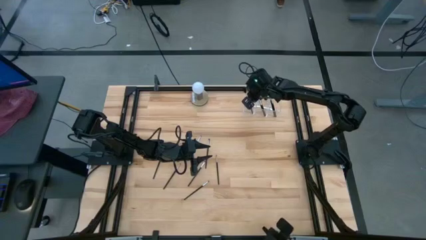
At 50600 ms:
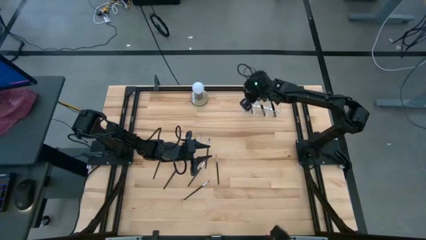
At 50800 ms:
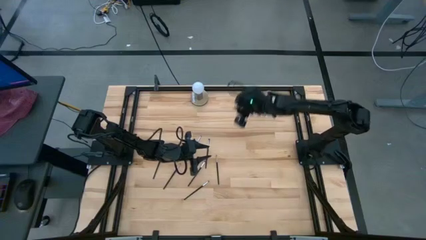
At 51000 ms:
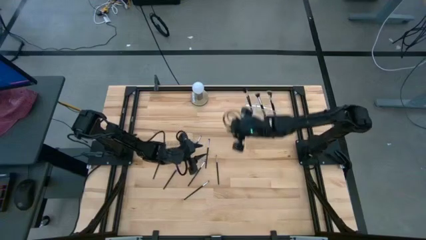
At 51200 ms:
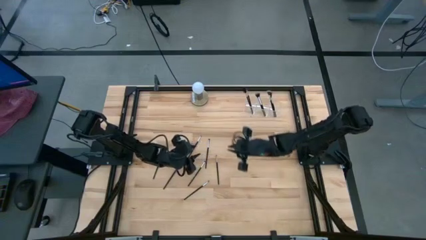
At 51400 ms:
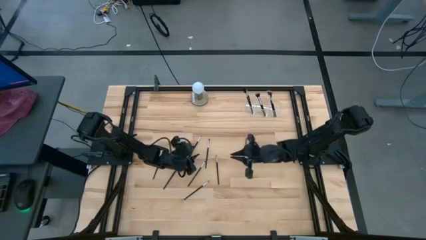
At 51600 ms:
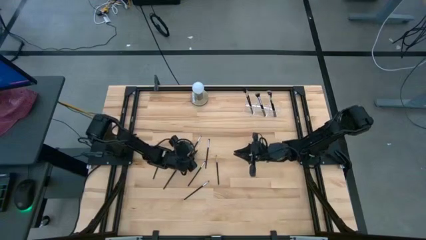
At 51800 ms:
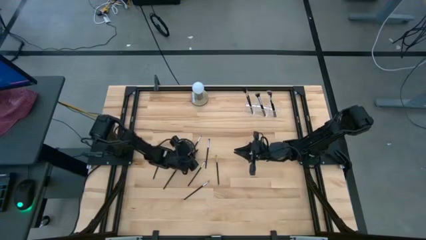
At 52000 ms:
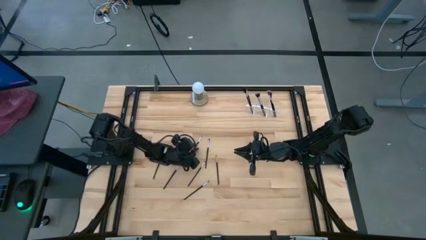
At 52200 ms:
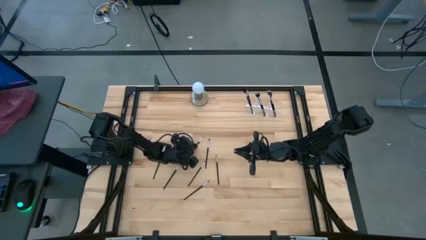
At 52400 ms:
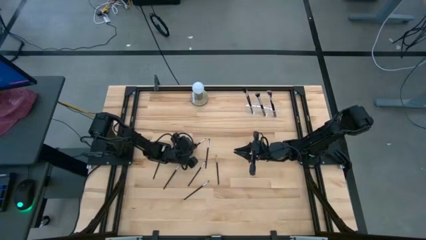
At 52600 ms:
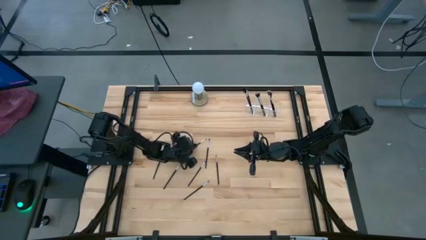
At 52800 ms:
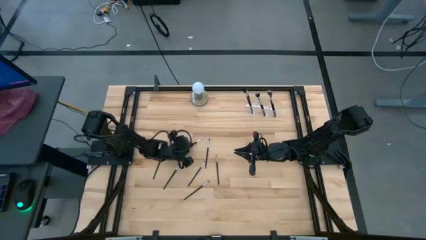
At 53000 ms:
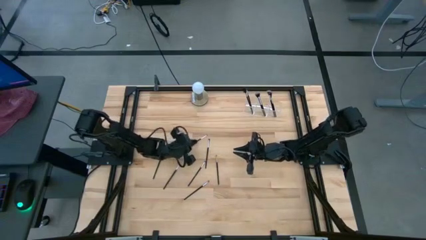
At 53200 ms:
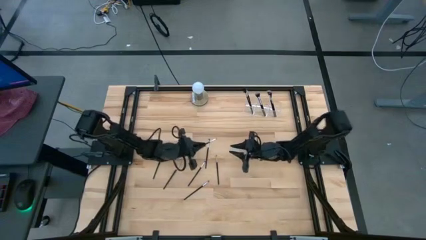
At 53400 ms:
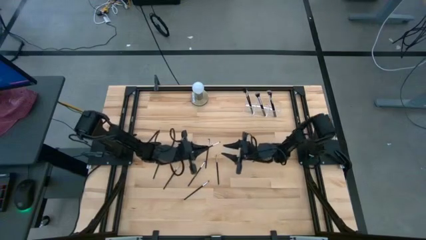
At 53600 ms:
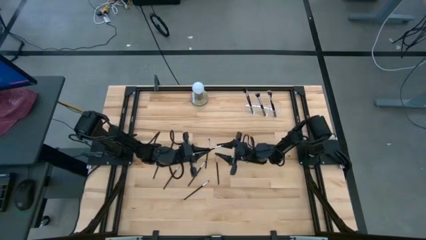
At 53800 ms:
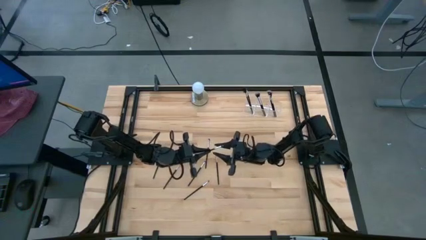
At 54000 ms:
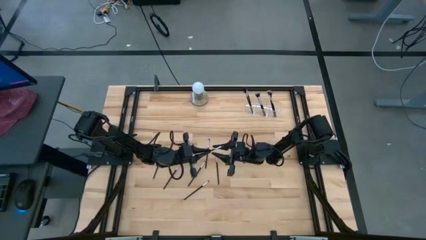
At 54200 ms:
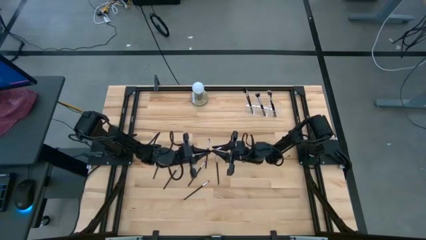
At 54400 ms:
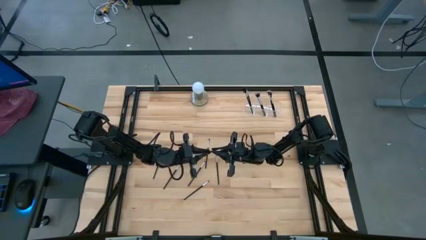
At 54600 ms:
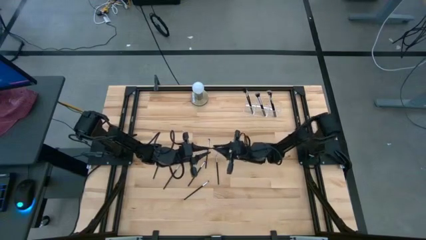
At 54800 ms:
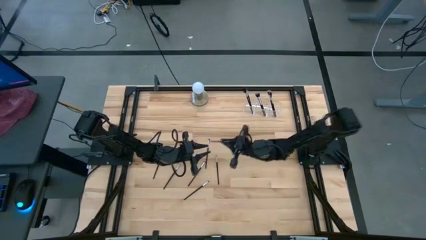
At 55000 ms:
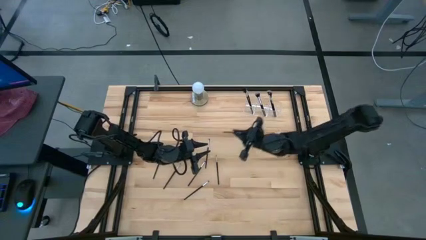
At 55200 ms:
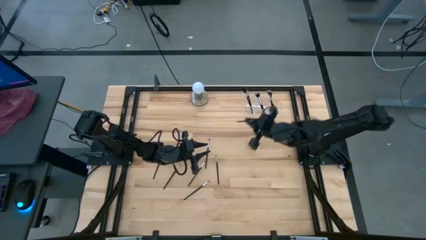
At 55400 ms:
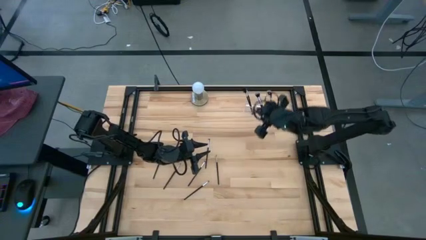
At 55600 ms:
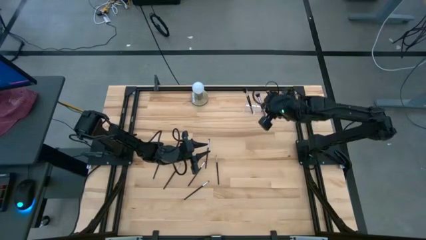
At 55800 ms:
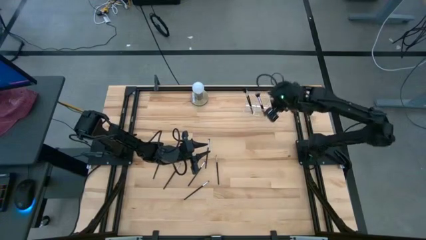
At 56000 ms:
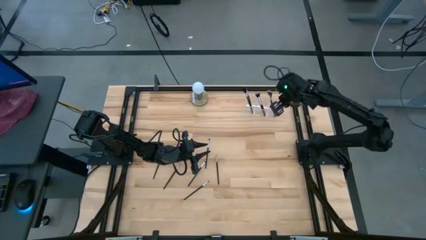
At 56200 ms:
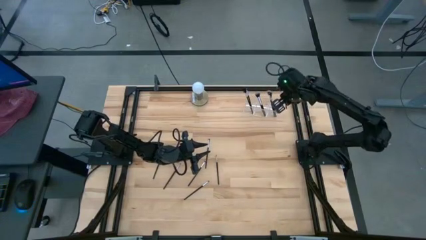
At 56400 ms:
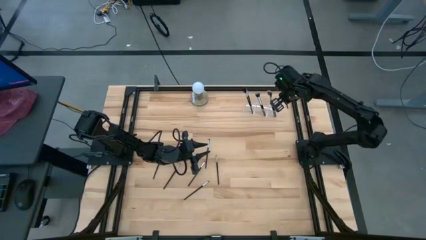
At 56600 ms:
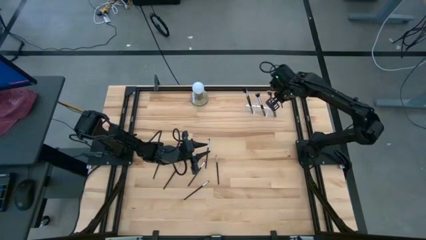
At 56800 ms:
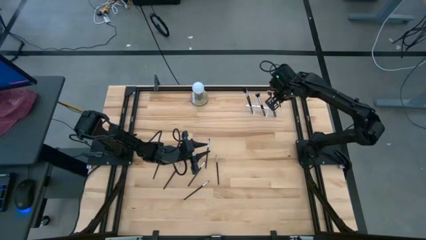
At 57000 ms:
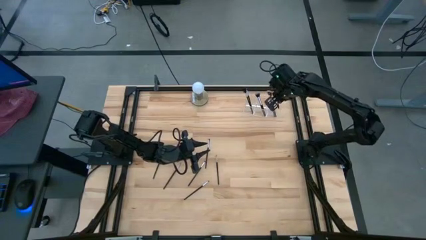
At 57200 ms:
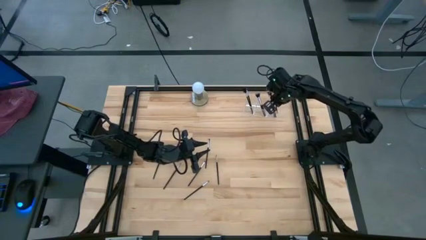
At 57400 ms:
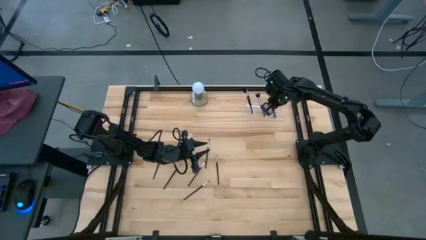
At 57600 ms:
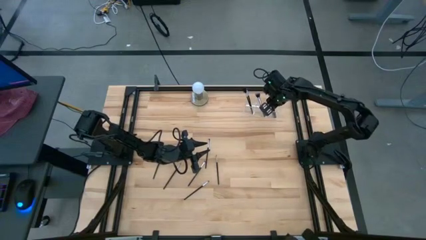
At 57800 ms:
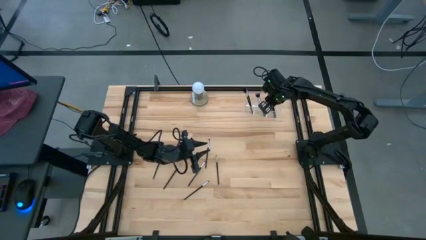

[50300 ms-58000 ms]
Task: Put items in baskets/containers
Put the silver eyeshadow brush into the transparent organizer

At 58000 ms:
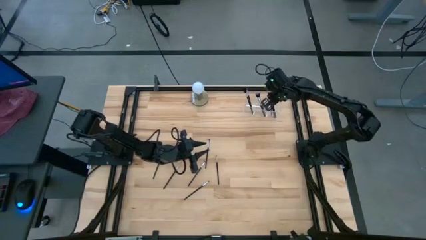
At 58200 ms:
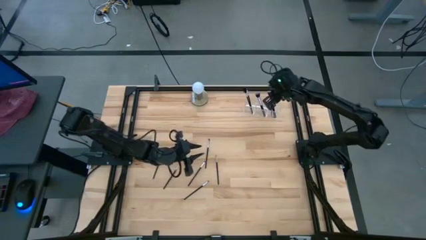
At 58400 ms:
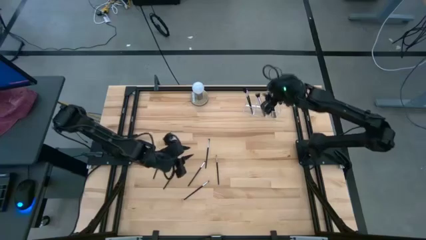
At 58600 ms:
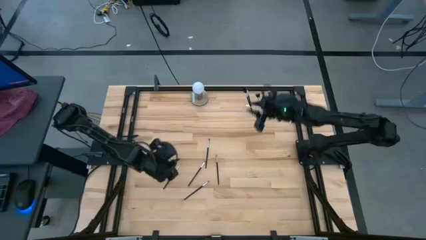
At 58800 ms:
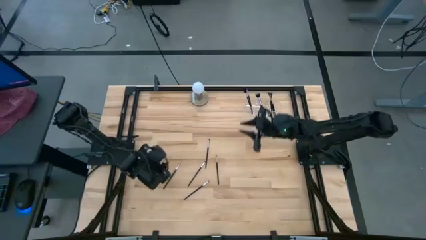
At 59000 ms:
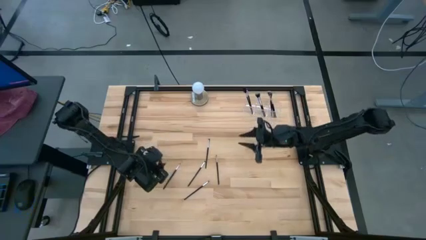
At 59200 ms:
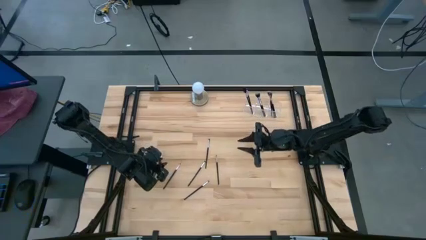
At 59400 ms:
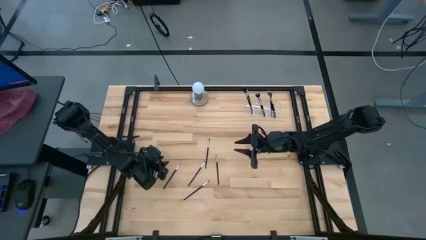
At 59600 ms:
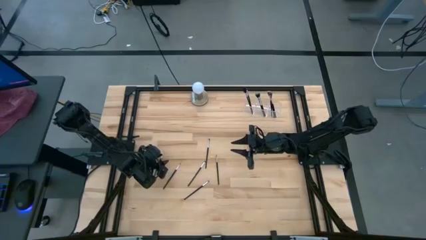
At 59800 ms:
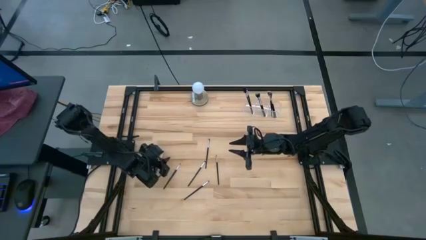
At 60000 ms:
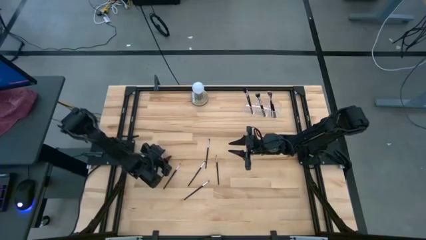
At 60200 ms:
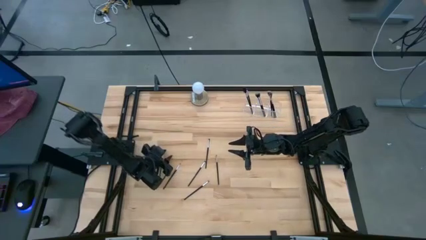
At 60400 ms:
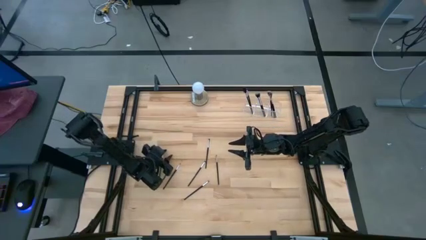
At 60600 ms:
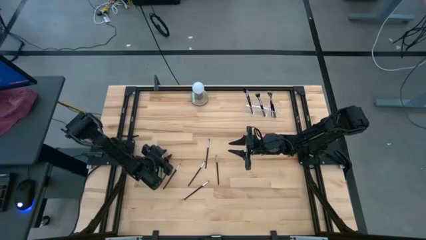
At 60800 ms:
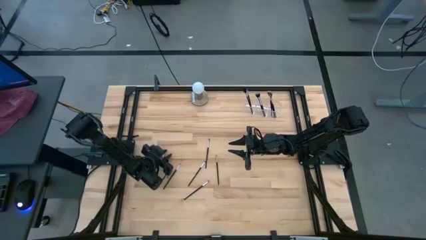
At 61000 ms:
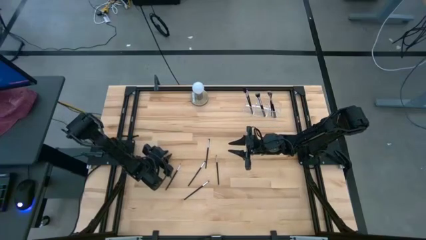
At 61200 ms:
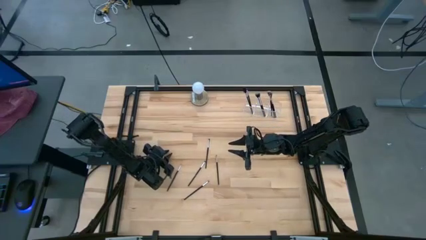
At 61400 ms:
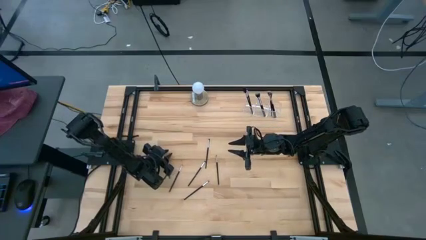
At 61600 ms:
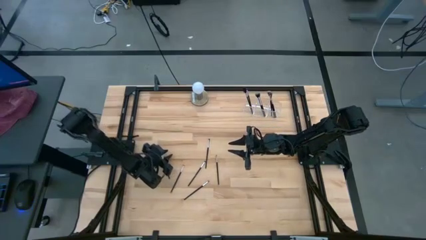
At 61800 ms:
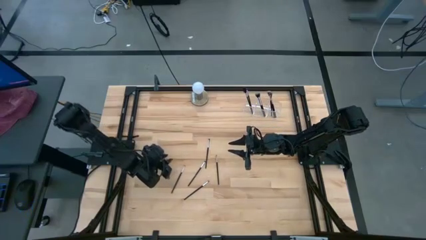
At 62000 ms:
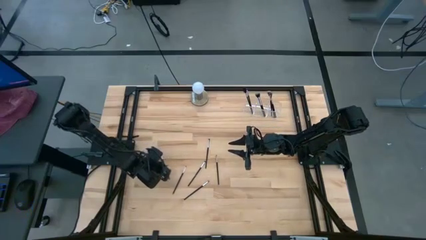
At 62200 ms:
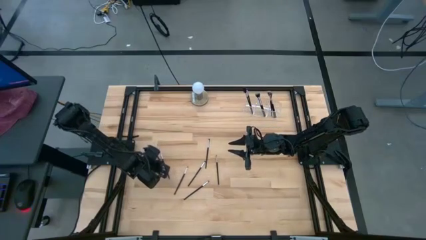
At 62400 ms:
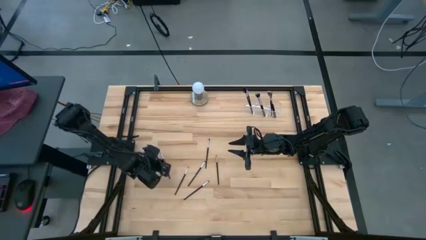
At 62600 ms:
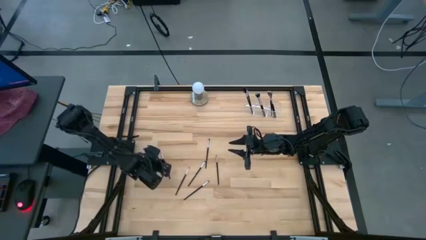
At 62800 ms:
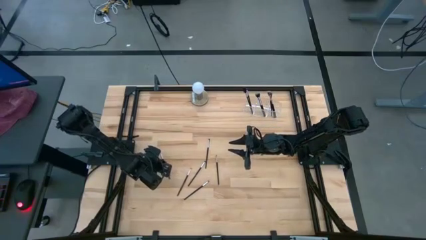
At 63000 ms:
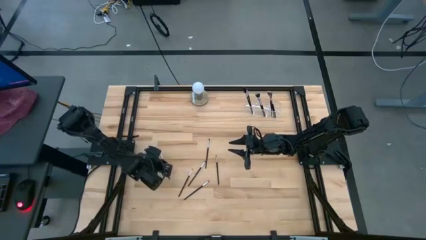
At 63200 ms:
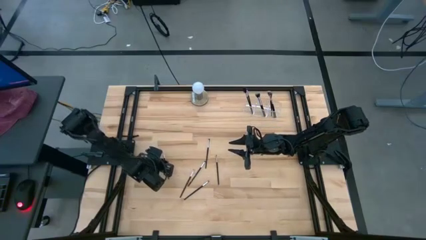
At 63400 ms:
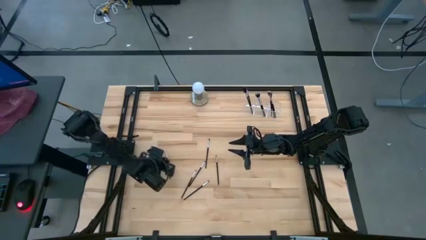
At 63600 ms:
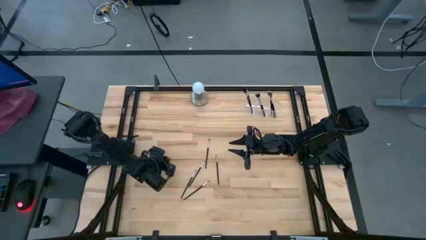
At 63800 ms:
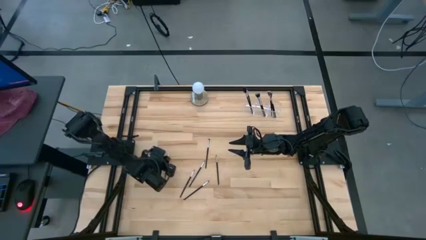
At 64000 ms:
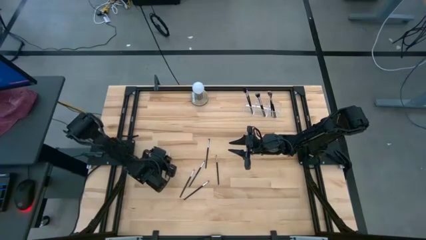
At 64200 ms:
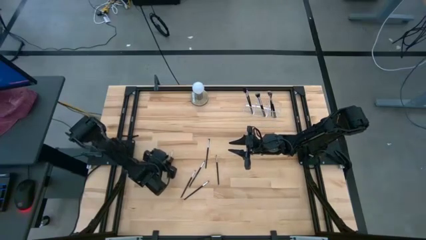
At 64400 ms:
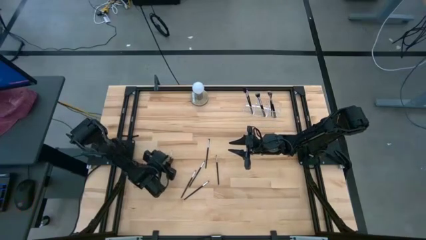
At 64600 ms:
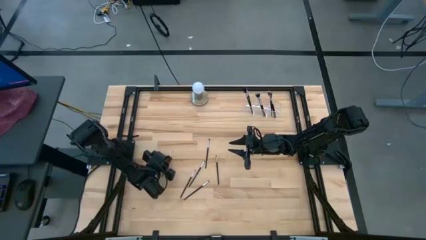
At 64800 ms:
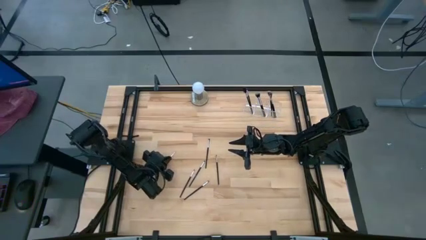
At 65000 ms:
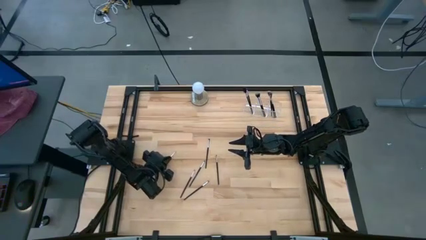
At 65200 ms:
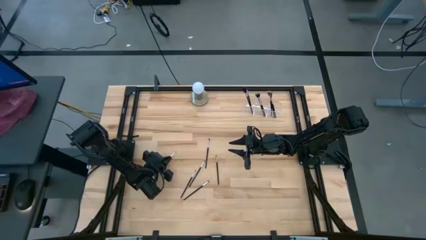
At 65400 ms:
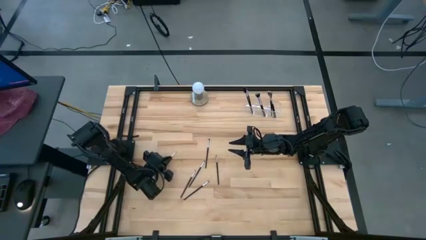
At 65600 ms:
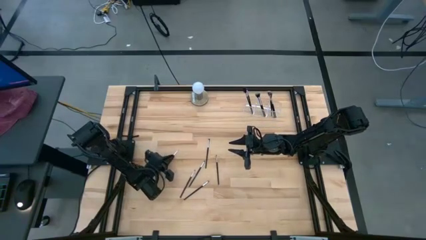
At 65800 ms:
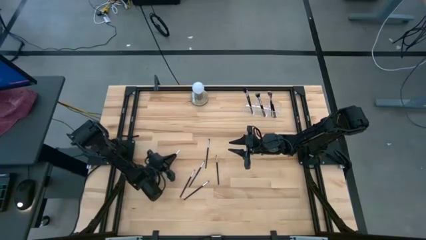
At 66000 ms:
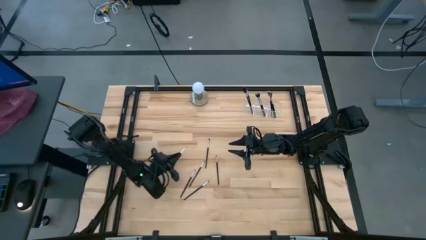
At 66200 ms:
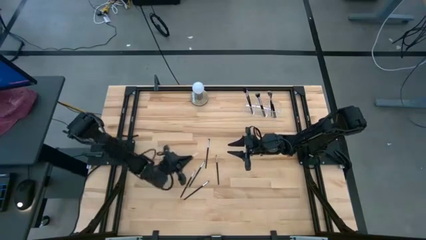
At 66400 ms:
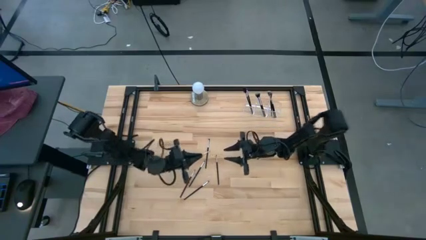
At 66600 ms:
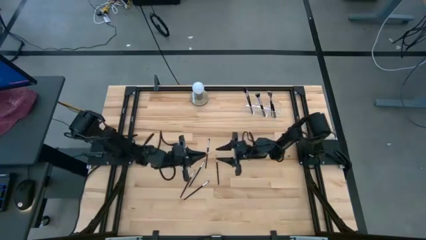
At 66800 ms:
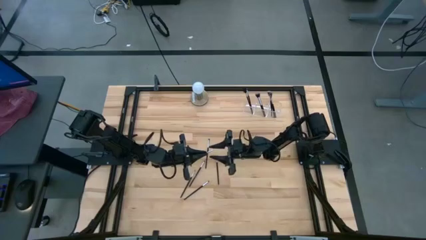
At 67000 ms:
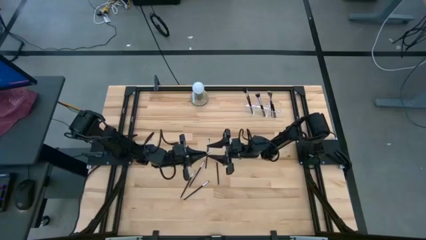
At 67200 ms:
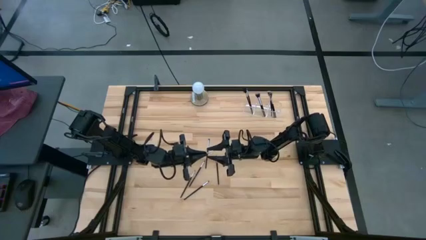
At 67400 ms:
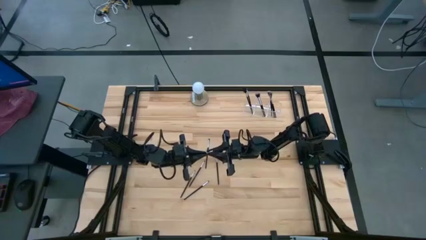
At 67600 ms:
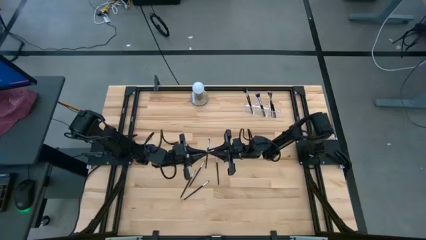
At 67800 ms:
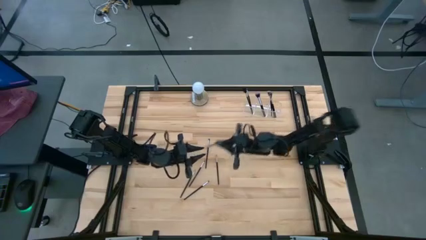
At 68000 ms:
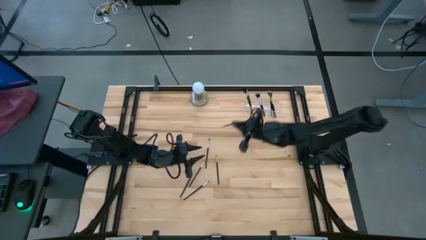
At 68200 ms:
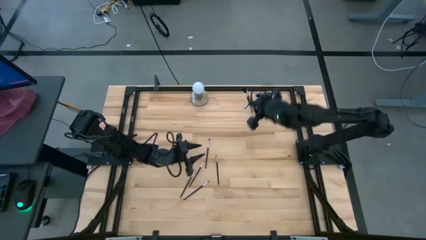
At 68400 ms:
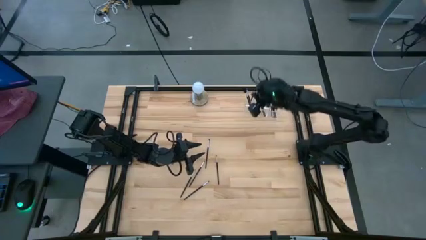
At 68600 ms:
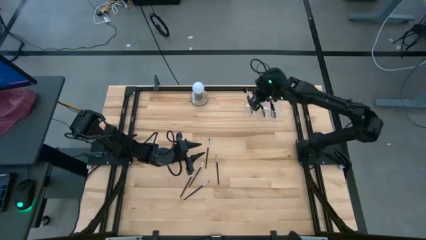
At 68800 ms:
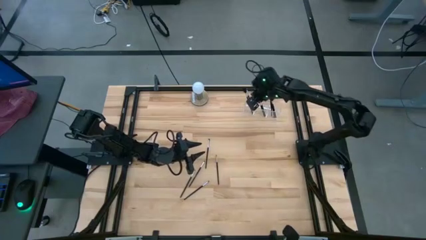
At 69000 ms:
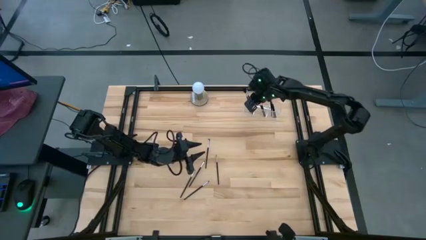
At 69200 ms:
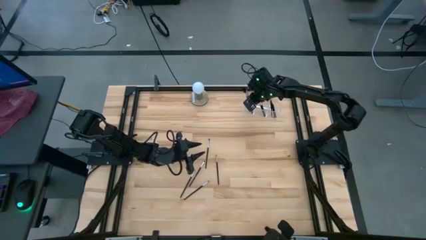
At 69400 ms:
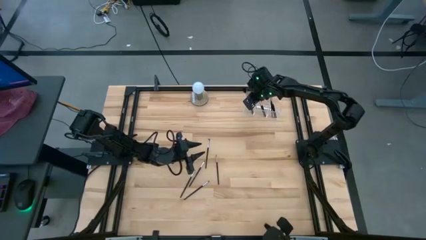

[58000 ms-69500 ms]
Put the silver liner brush into the transparent organizer
